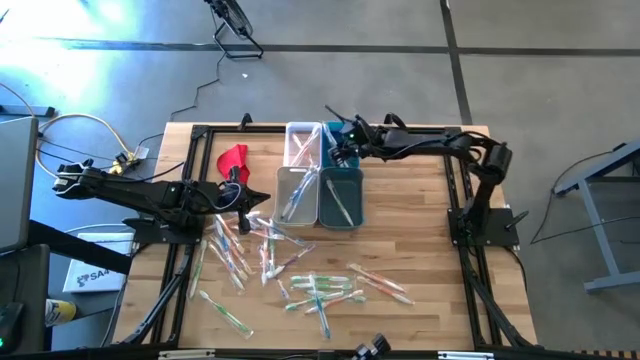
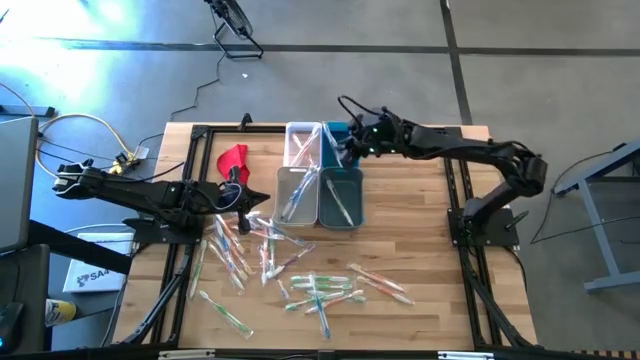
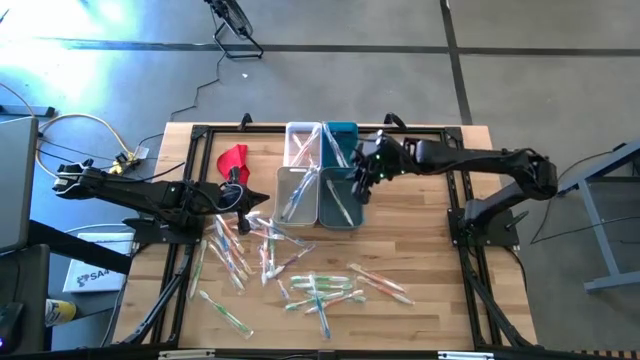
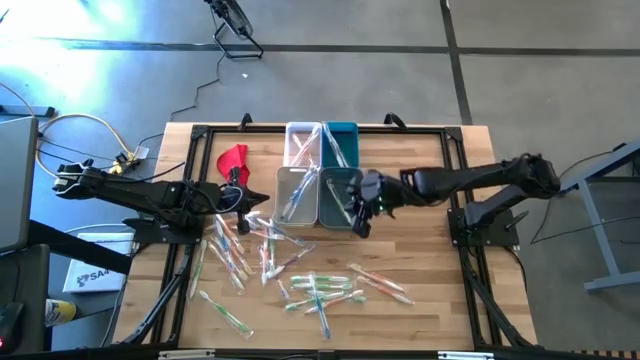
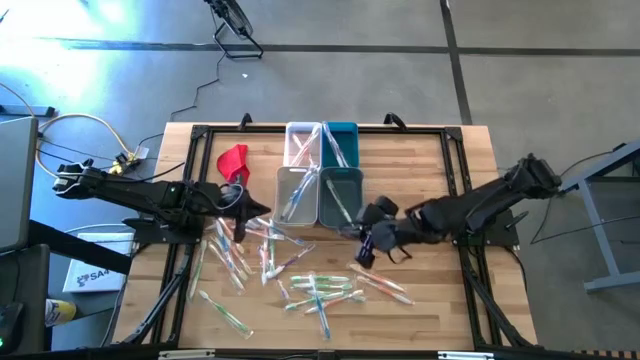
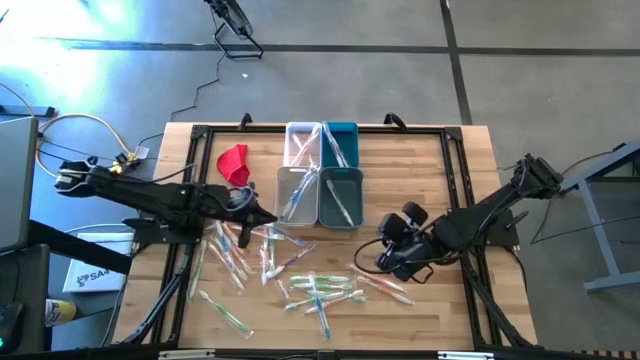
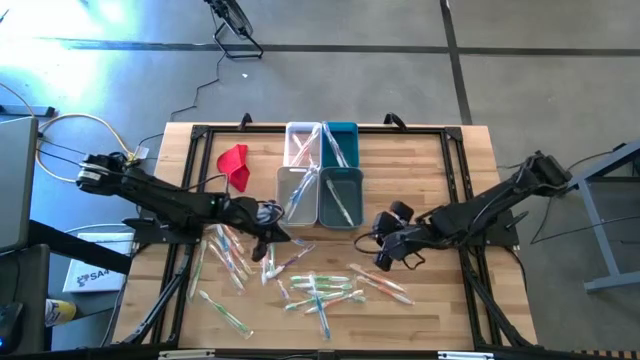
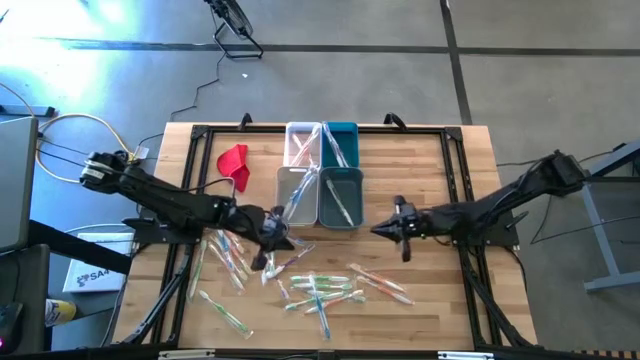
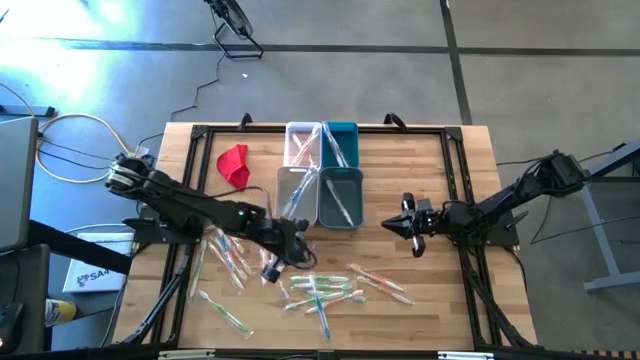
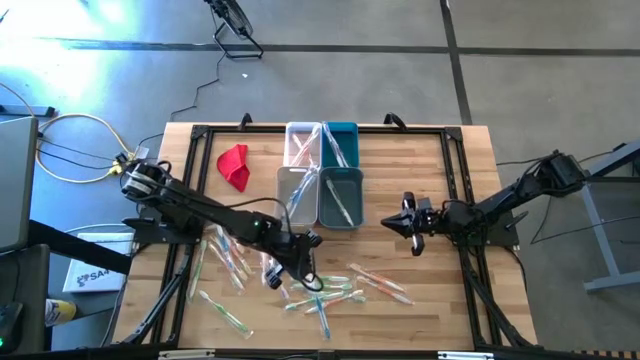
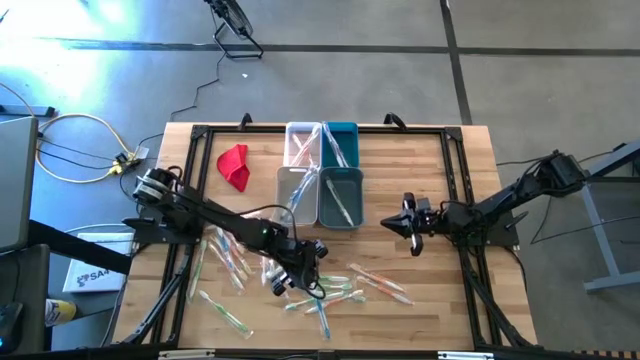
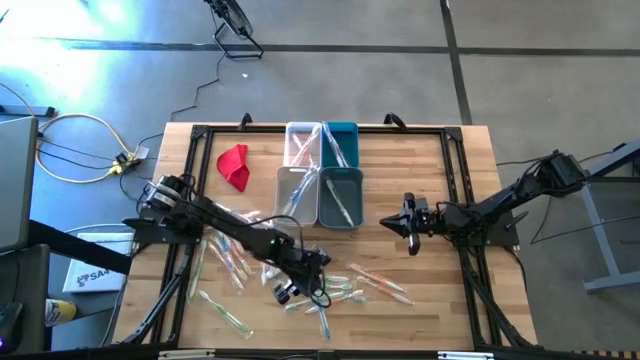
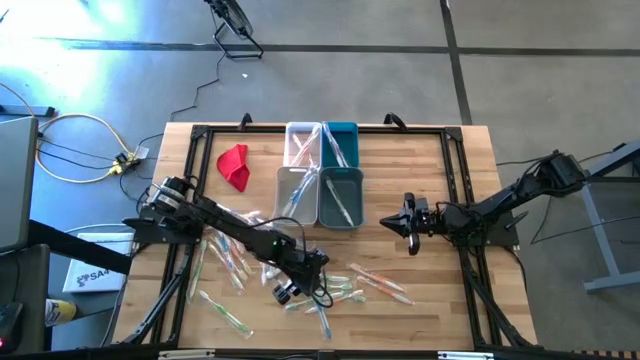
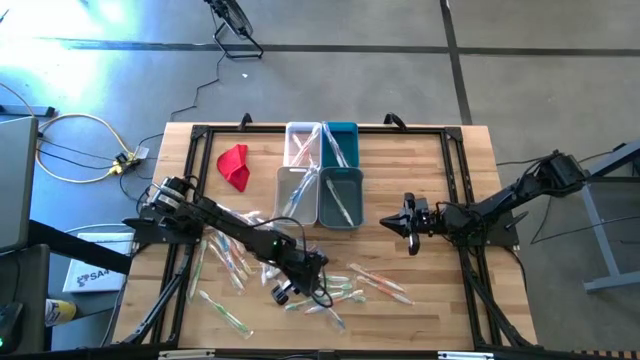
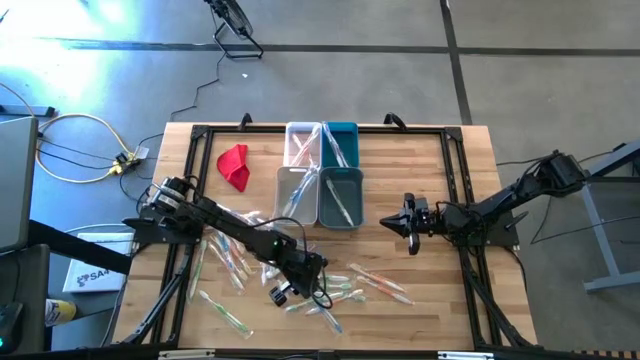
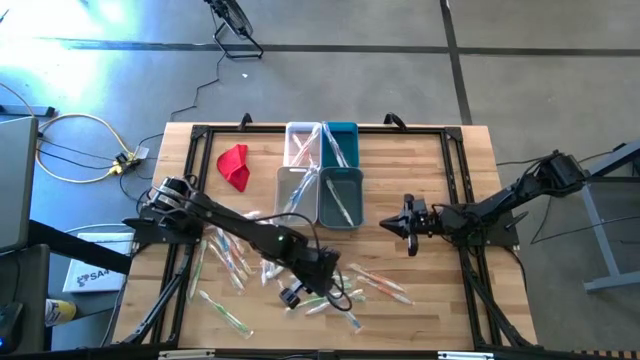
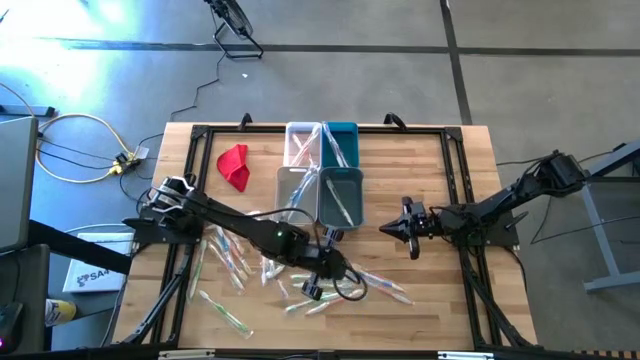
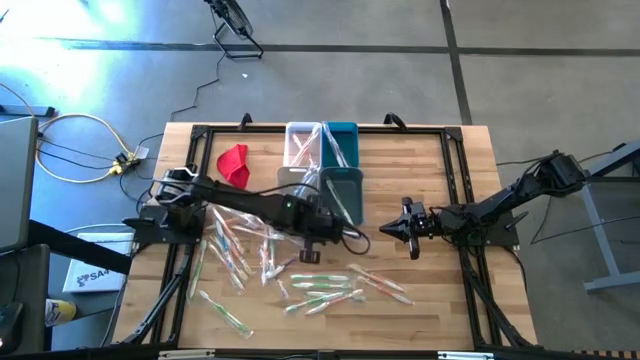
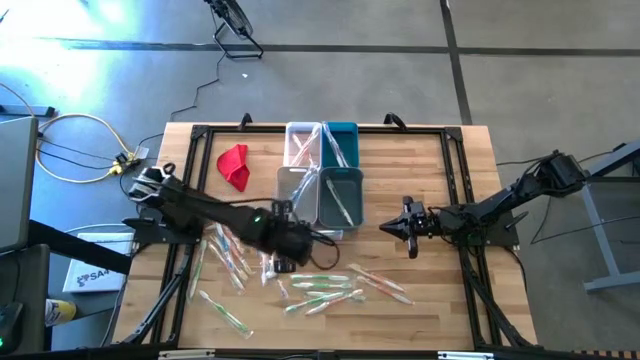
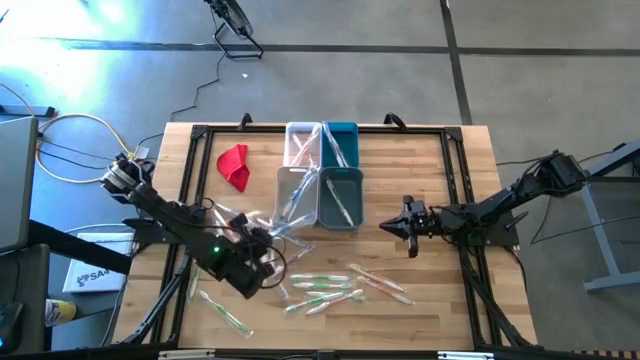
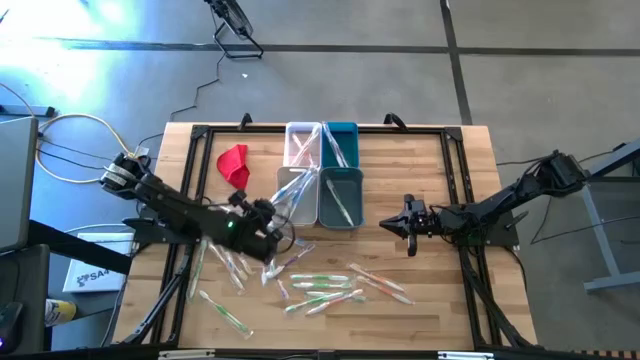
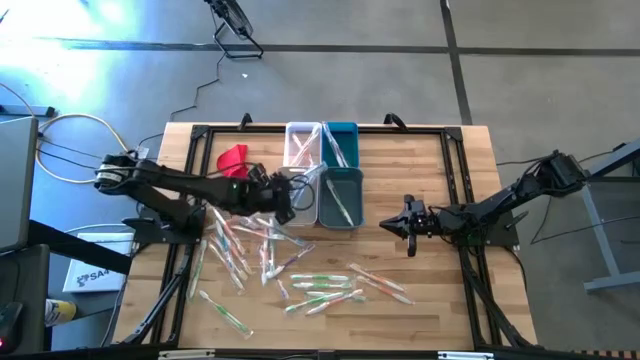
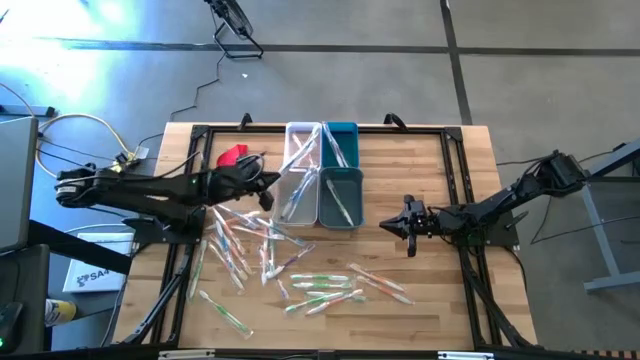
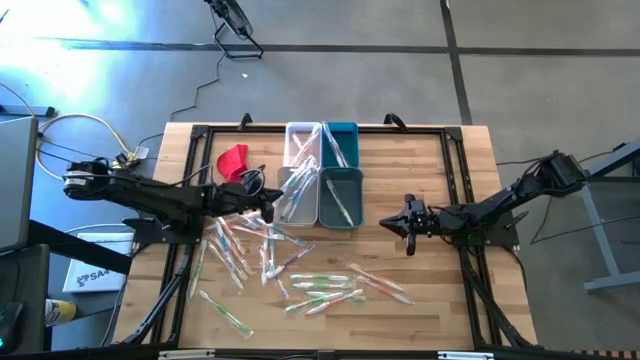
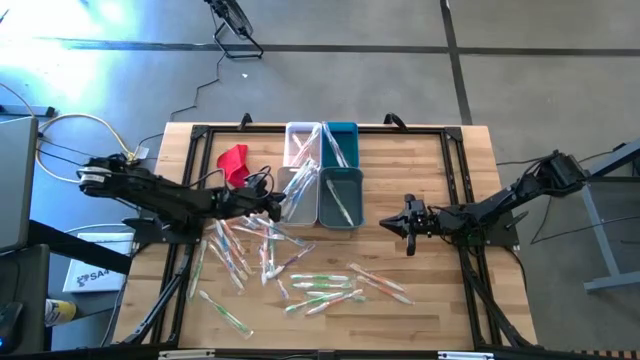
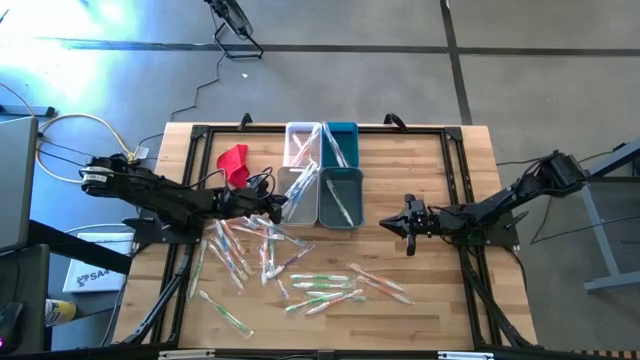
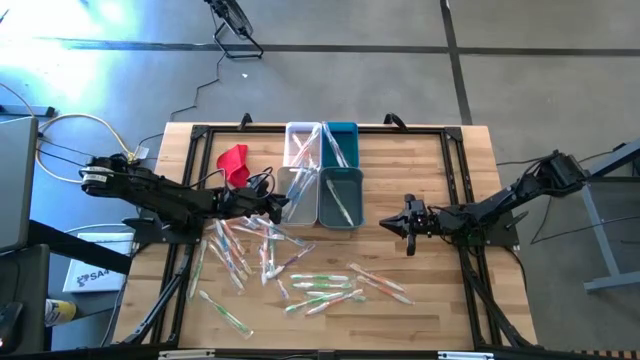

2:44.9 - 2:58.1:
Task: Pick & Place Toothbrushes
Put the blue toothbrush into the gray bin

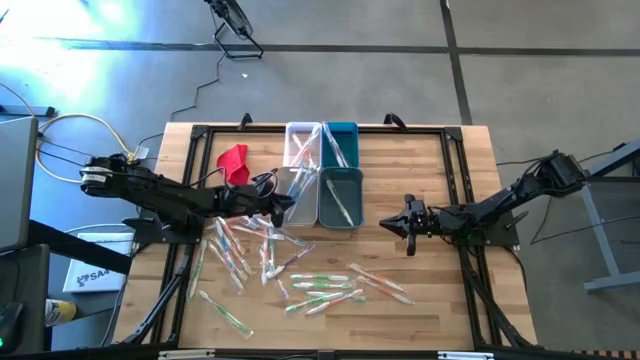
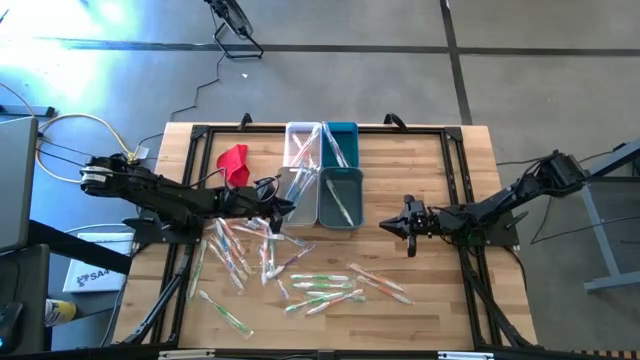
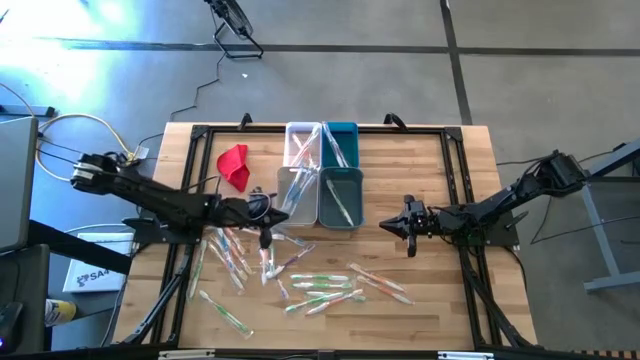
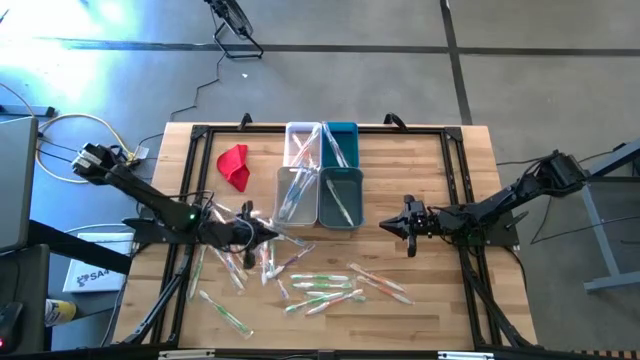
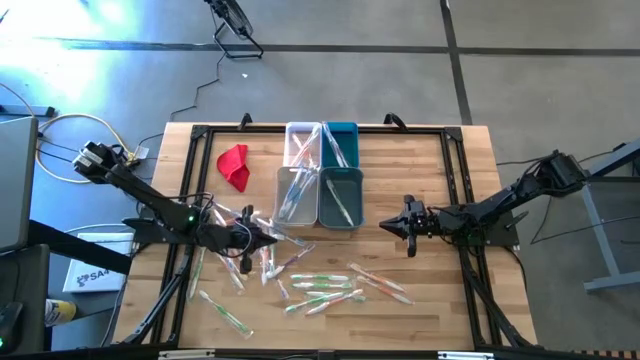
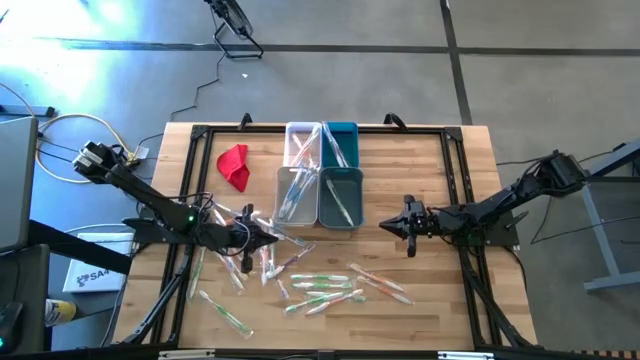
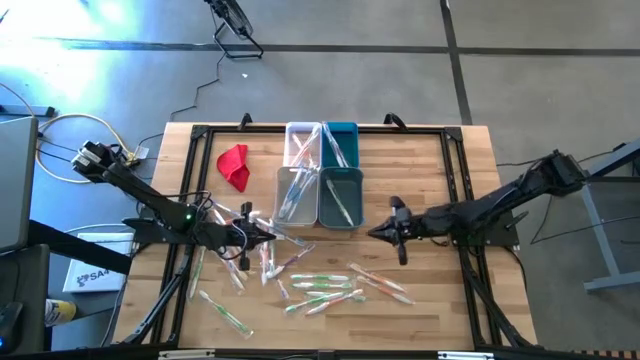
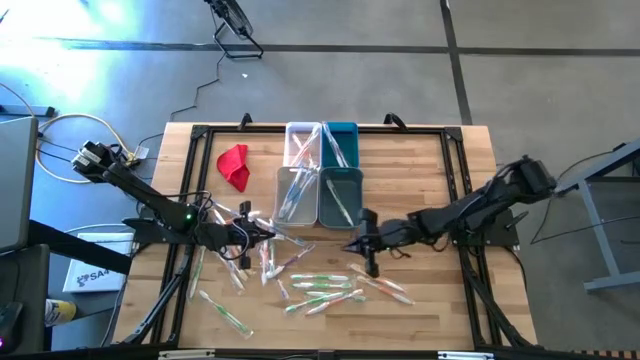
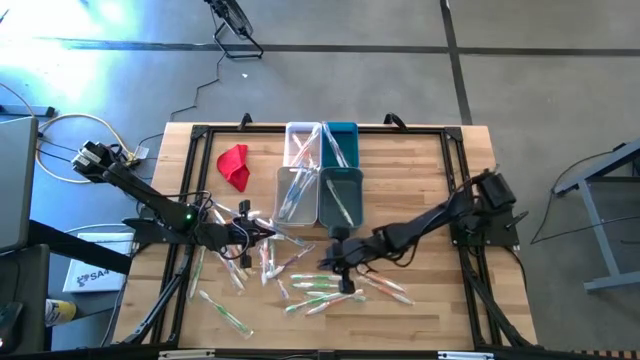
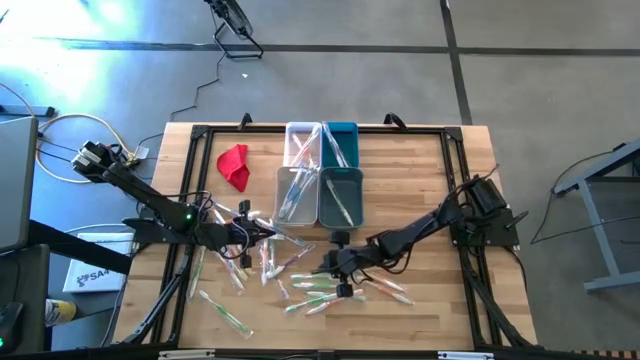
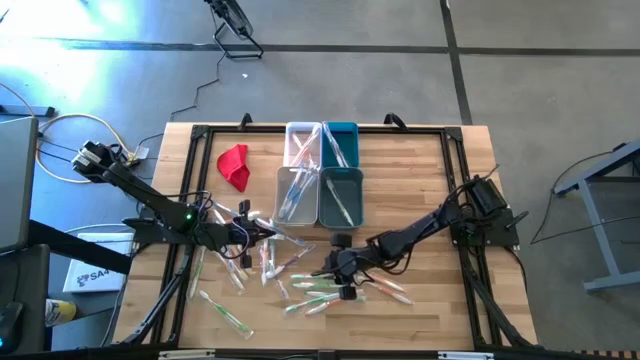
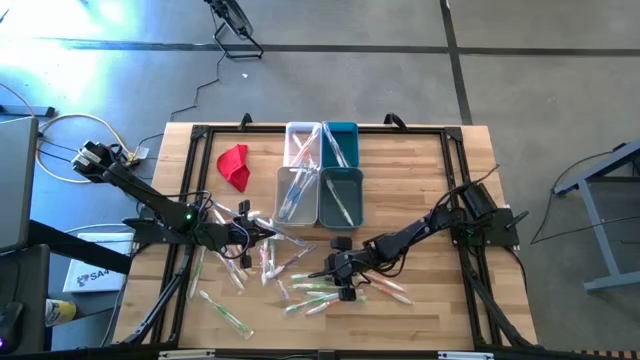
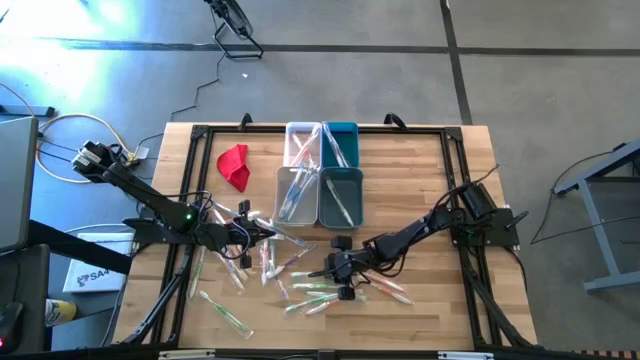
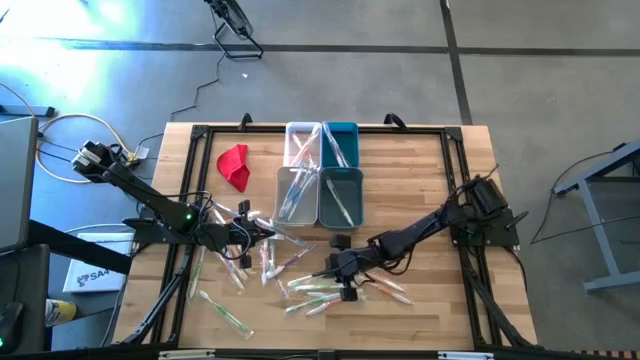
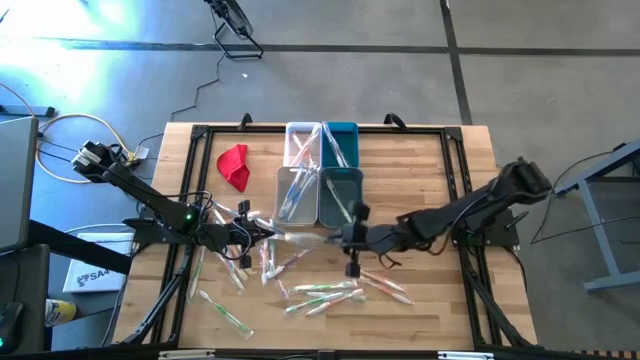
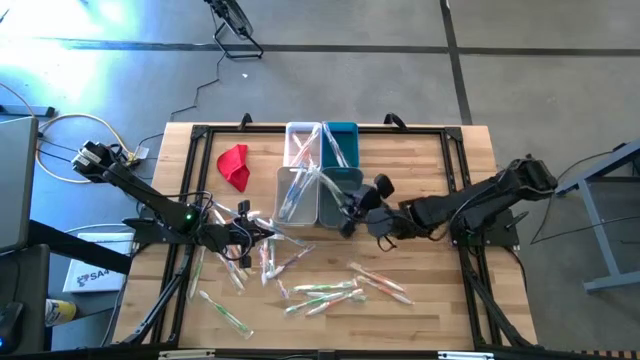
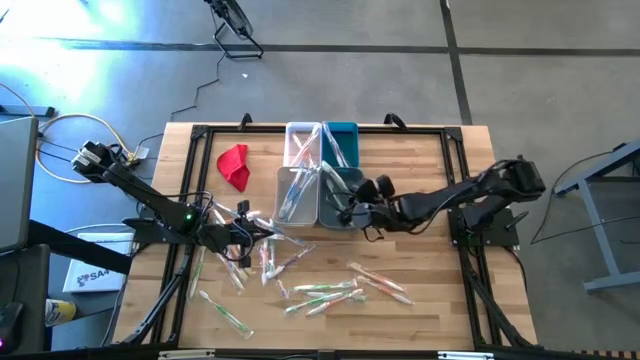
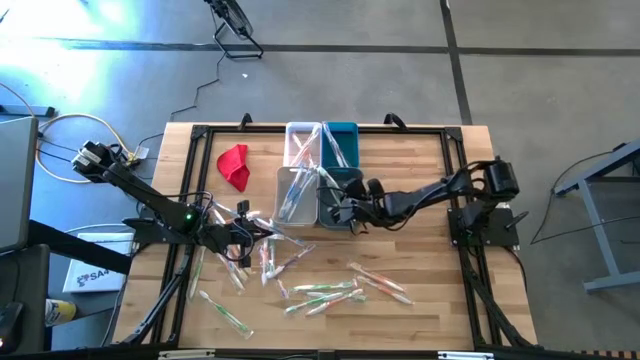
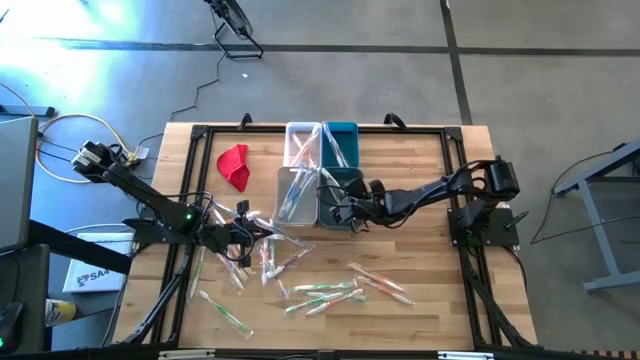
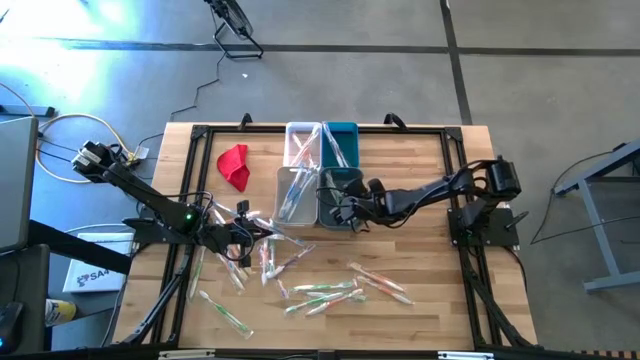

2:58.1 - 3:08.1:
Put the green toothbrush into the blue bin
